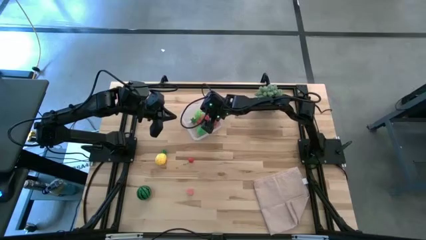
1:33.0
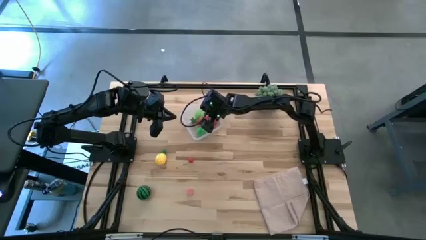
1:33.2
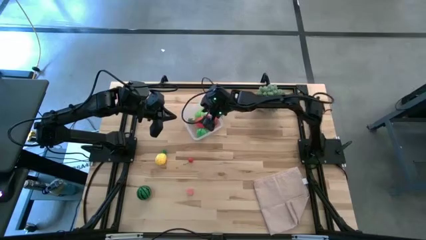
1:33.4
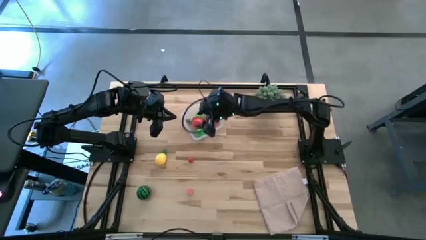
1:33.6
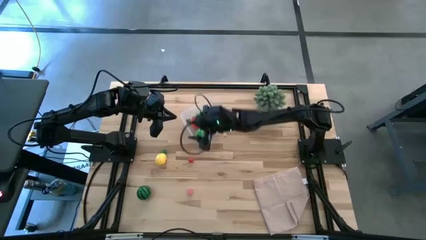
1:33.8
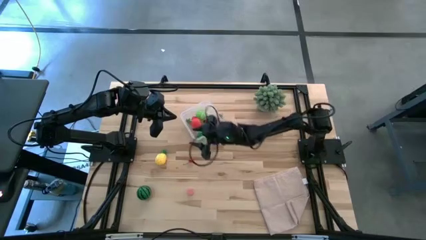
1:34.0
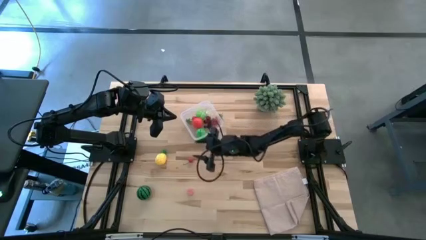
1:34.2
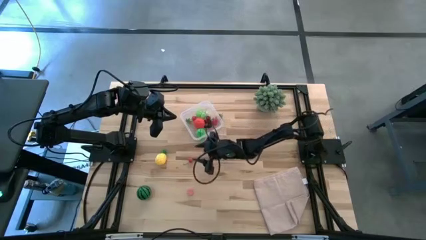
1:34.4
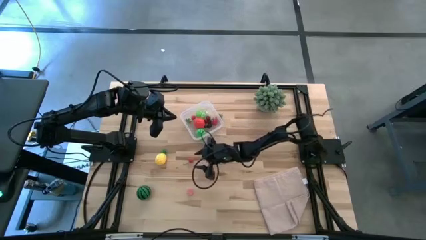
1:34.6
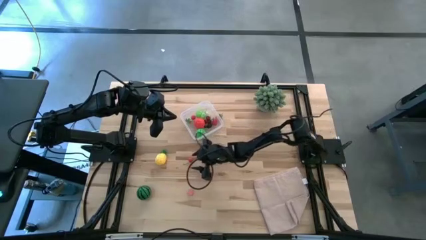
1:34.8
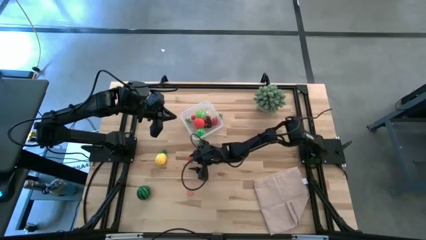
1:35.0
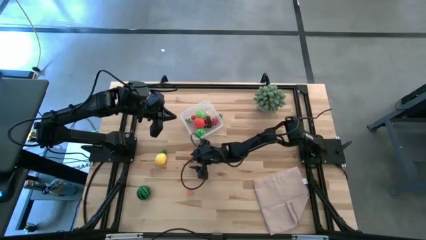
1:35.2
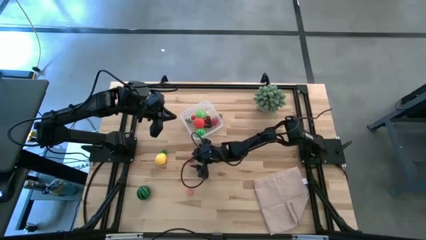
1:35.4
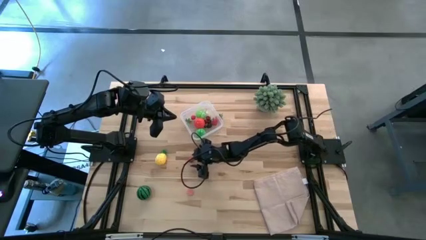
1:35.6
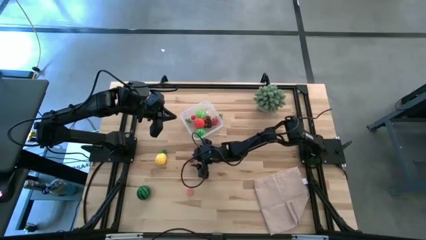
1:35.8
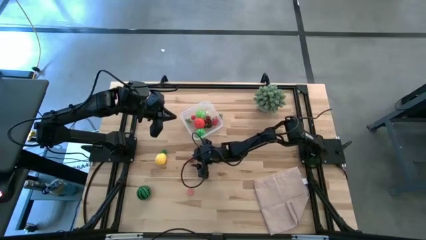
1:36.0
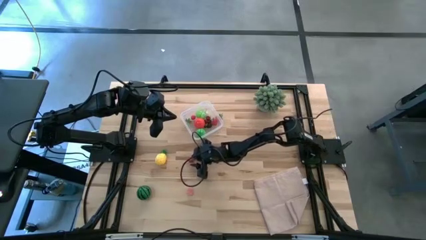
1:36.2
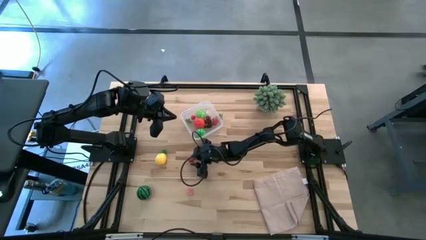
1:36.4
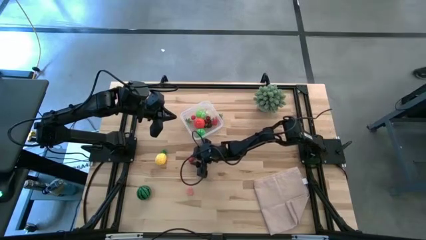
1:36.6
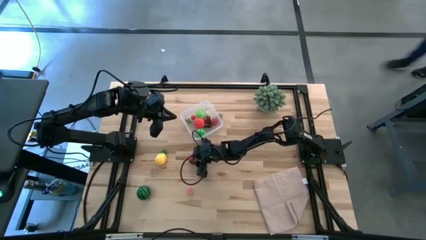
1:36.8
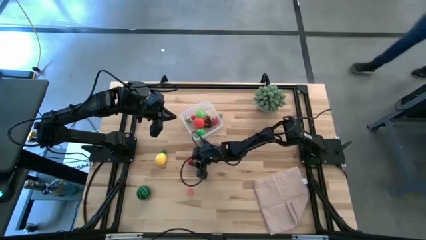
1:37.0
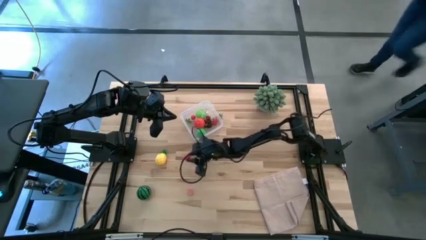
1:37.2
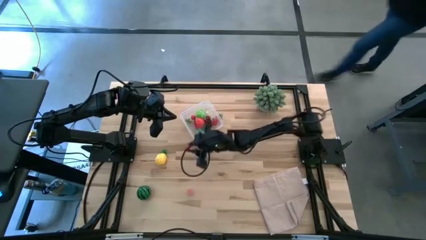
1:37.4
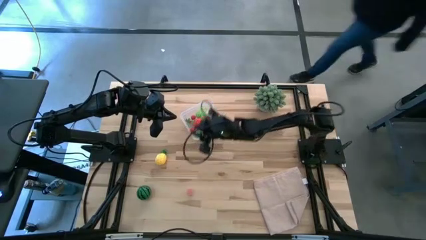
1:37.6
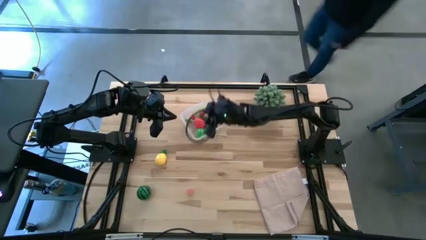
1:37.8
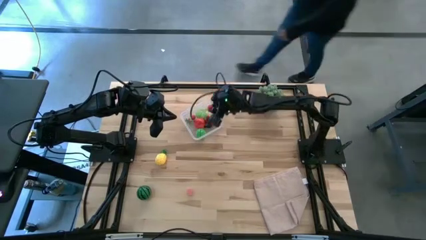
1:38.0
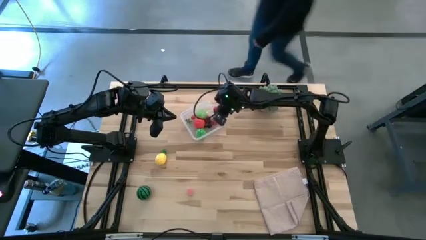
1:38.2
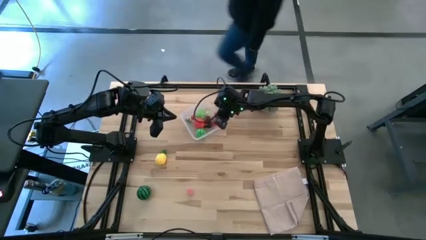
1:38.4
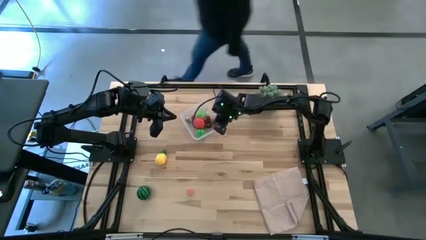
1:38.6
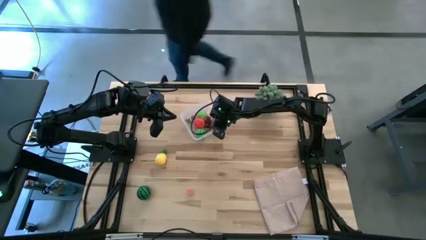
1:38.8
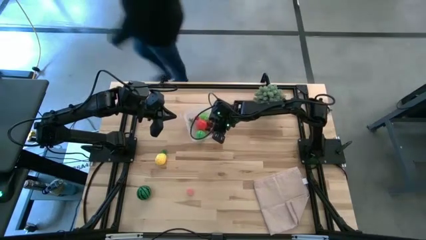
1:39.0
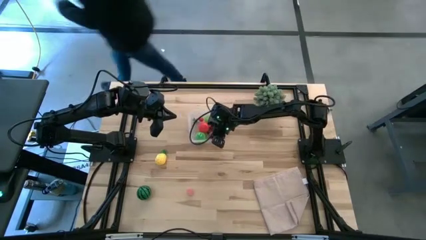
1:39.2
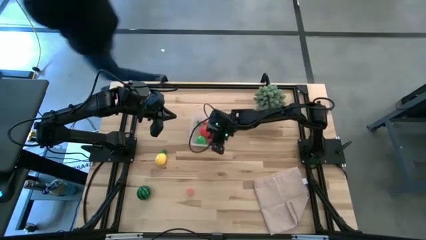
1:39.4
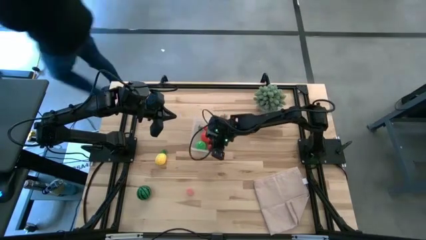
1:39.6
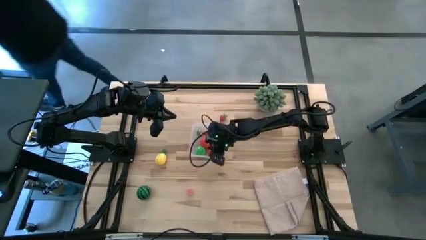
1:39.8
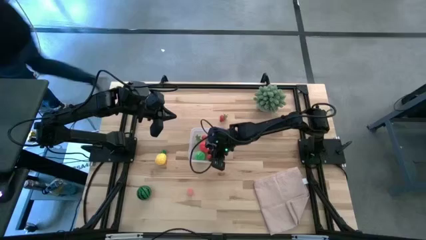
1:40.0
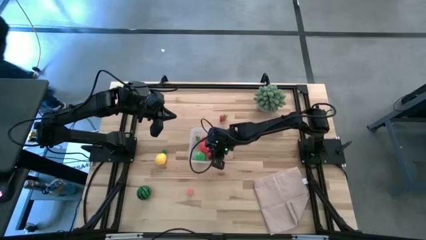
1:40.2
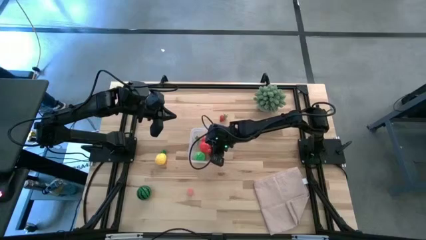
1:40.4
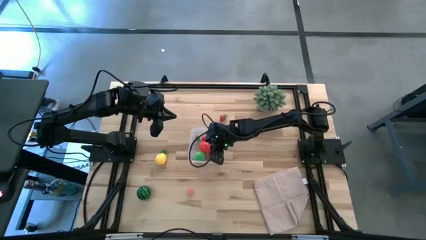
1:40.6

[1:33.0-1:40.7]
Task: Pick and placing Produce into tupperware
Put the red cherry into the transparent bin

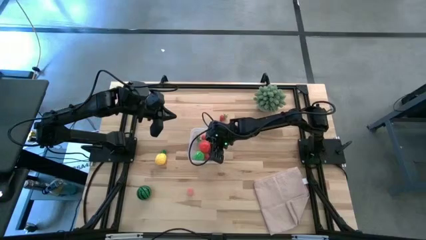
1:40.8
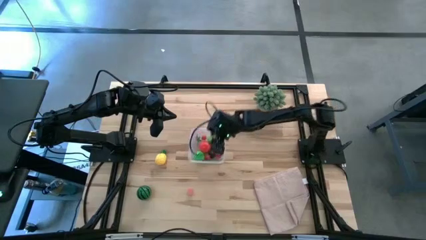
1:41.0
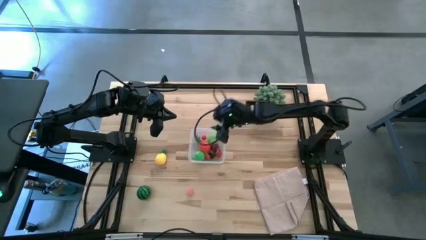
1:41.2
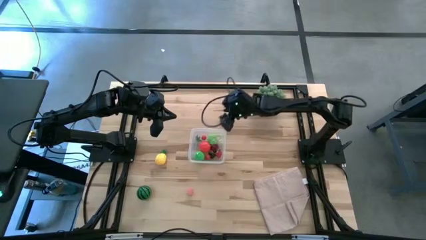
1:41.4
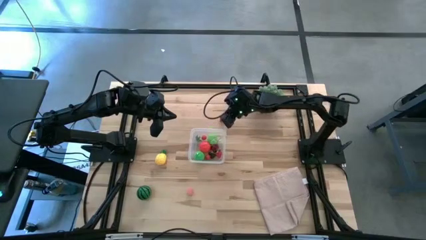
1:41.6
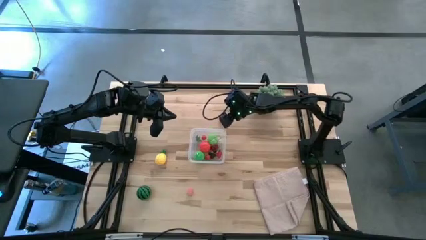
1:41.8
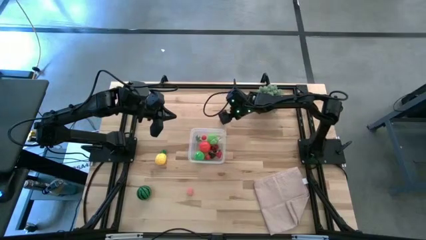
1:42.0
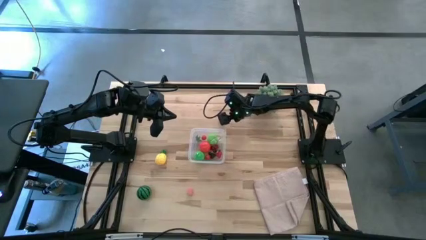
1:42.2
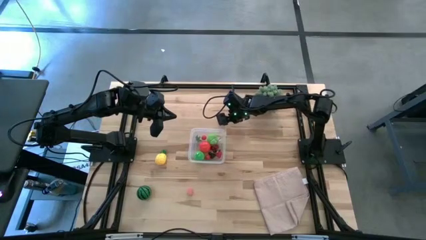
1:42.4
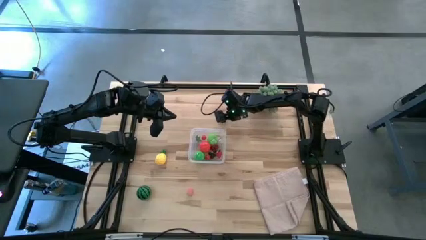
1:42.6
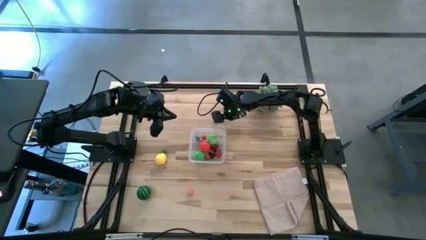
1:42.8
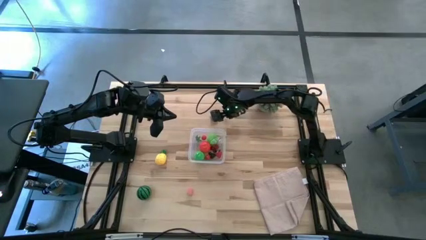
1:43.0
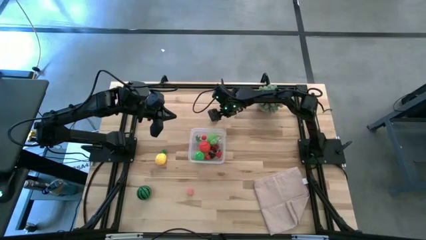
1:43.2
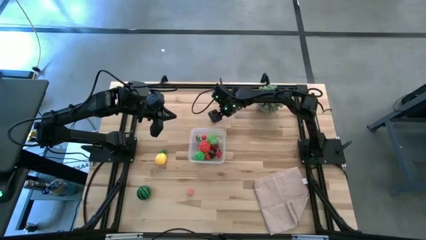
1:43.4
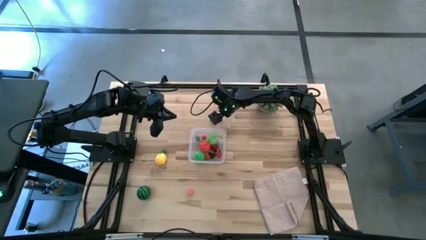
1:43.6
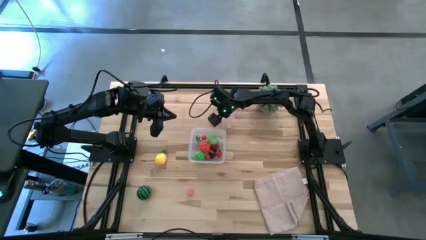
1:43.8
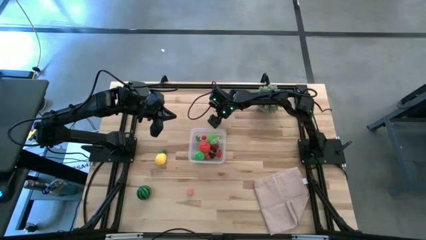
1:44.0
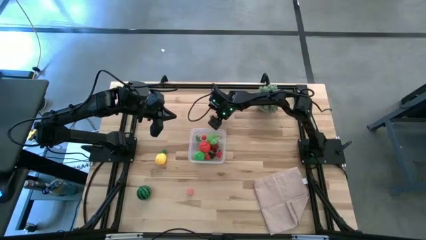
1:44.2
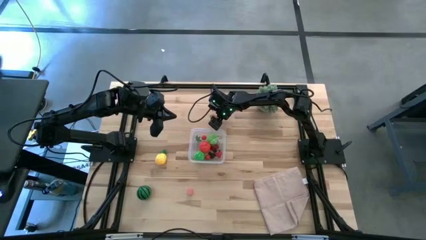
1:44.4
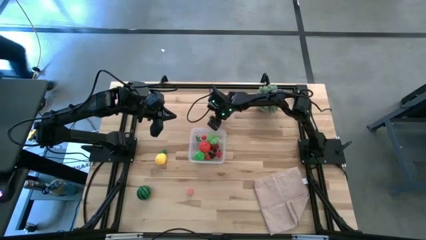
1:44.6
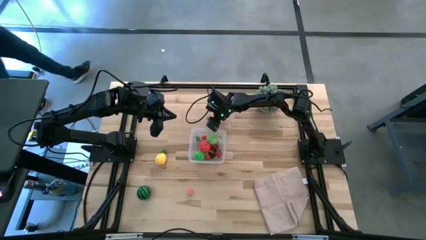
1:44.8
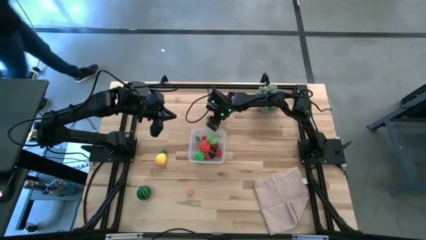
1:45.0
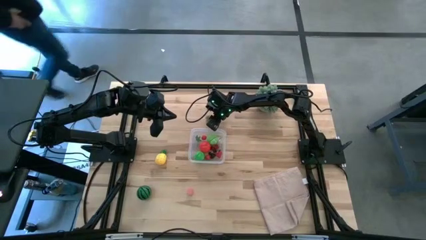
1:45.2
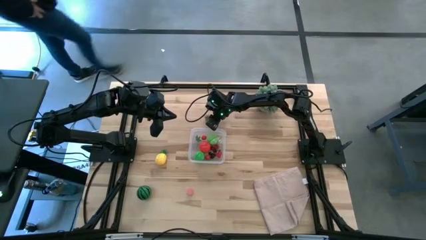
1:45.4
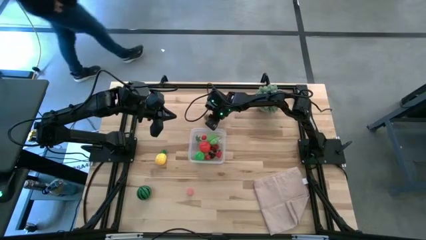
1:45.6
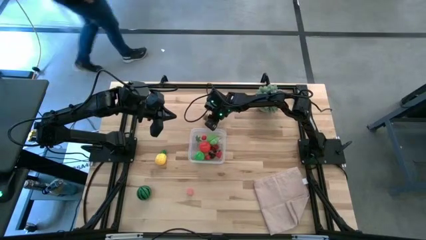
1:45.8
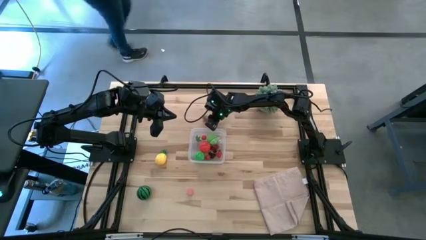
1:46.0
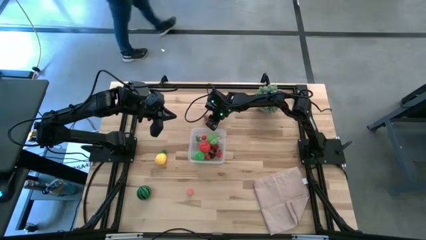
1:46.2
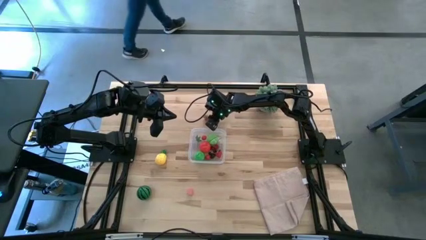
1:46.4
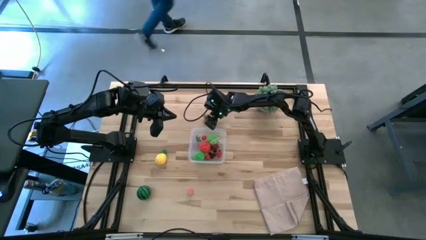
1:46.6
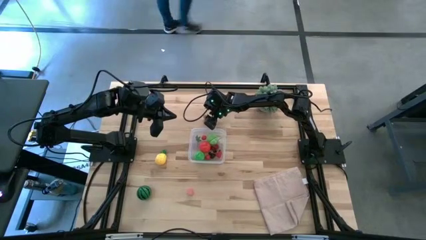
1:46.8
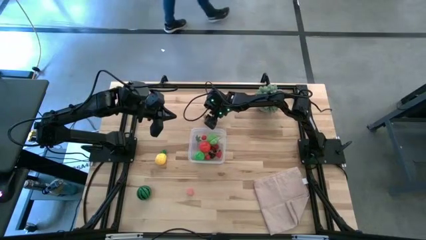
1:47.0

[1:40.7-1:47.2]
Put the red strawberry into the transparent bin

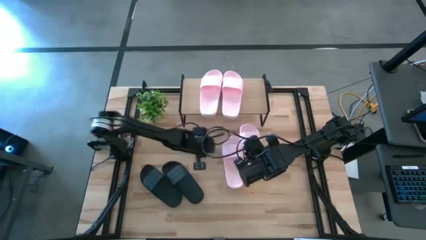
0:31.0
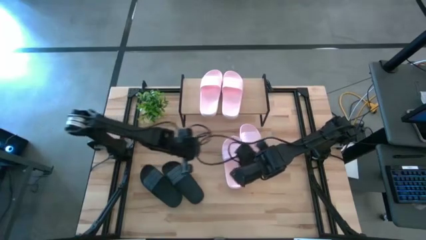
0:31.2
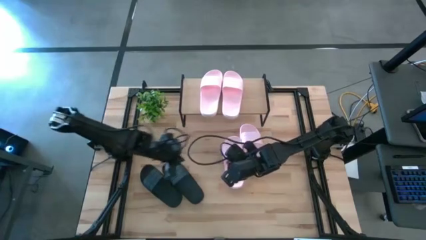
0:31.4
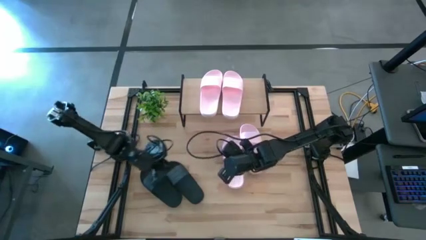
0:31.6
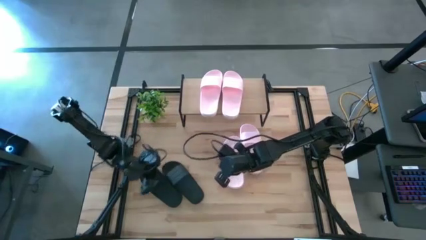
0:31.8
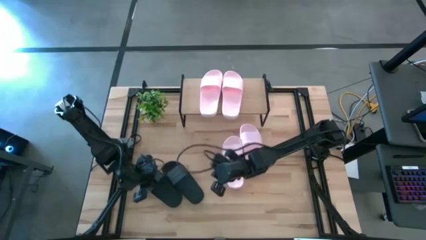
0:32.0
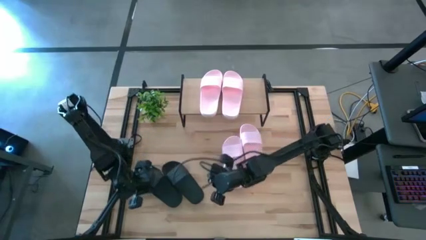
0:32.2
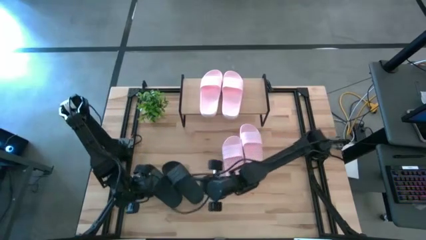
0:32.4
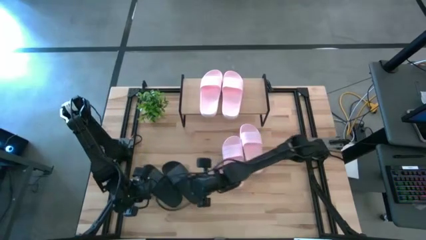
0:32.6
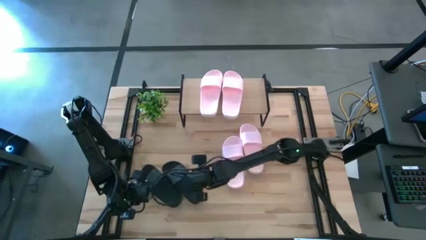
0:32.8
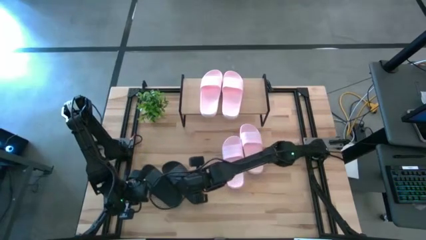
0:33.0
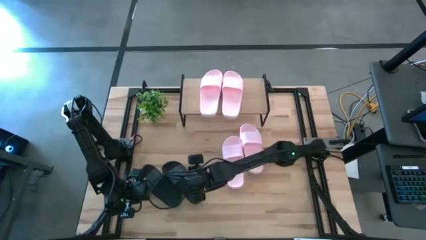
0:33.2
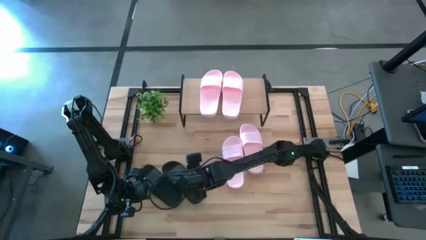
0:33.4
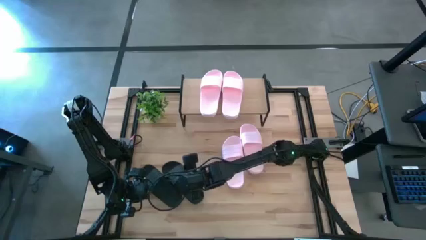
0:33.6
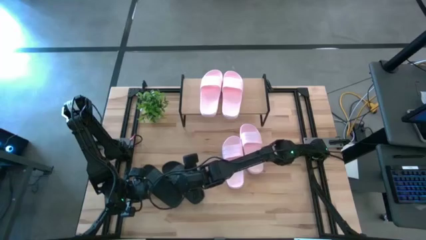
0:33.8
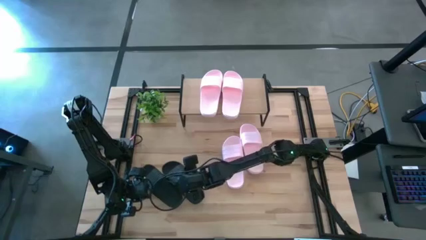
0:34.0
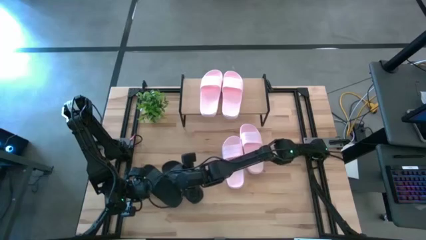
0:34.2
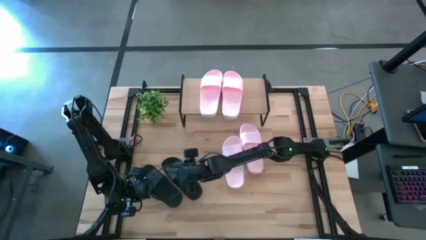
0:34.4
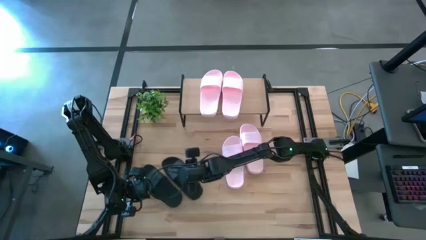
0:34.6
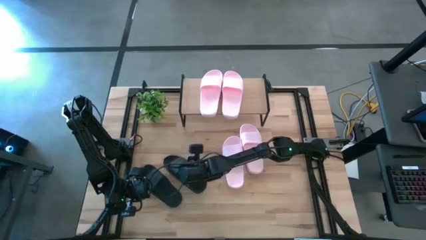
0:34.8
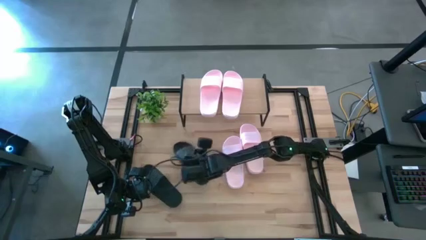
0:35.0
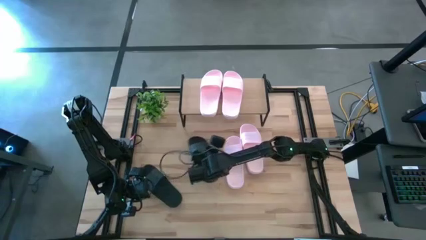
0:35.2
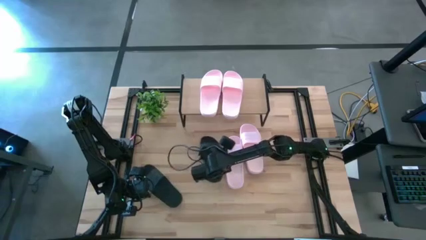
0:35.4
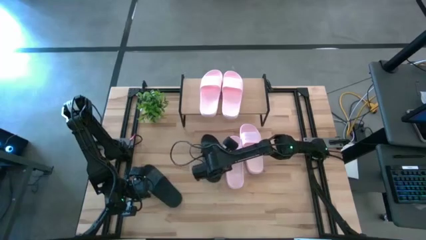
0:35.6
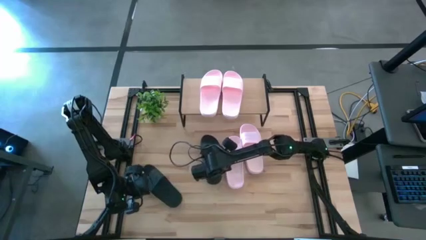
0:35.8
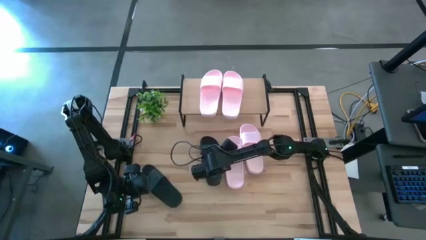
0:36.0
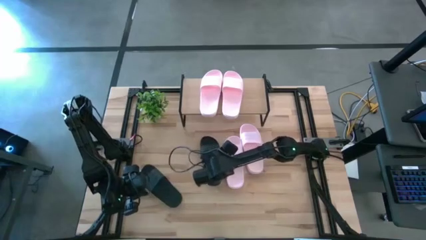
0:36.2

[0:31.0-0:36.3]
Task: Pick and place slides into the shelf
Move the right black slide beside the left pink slide on the table
